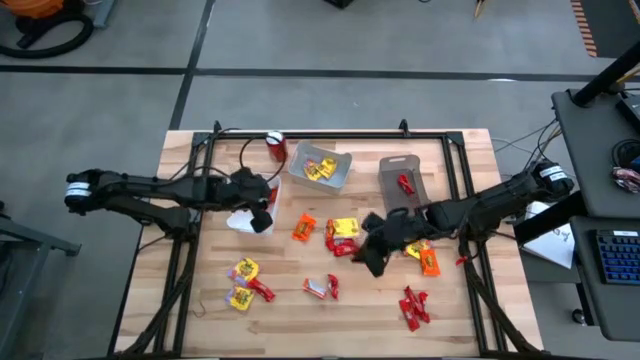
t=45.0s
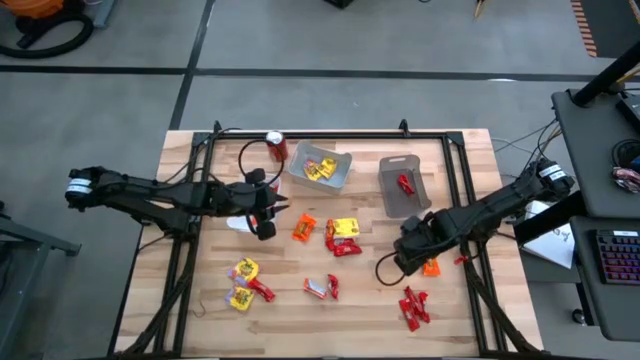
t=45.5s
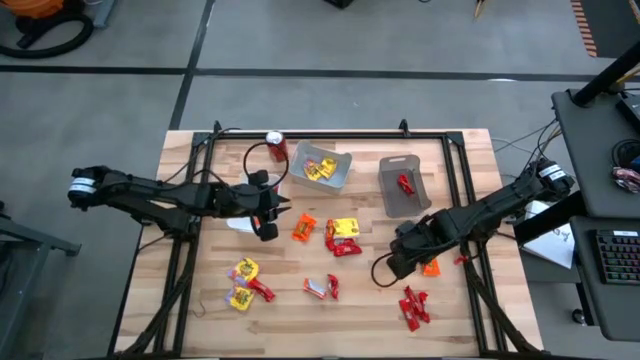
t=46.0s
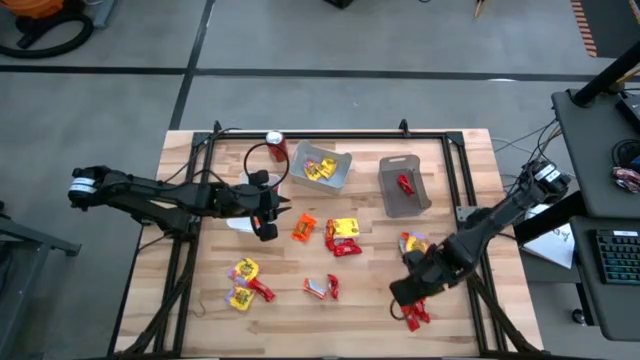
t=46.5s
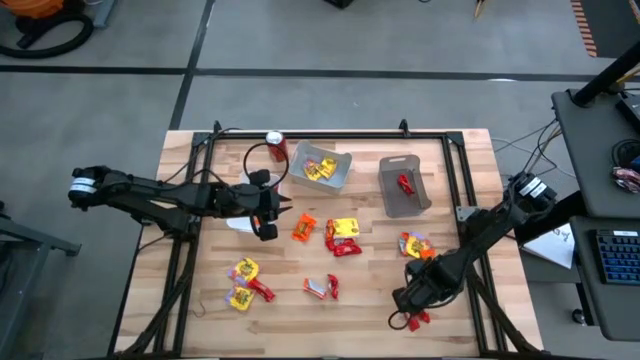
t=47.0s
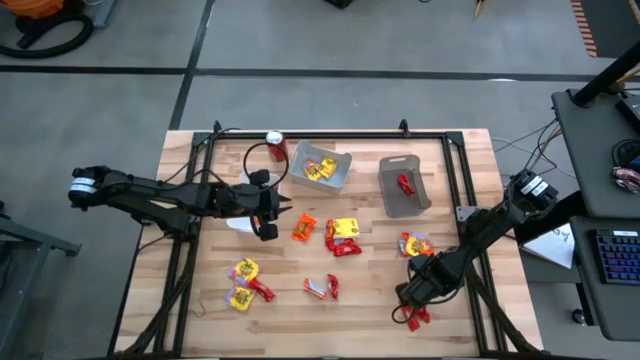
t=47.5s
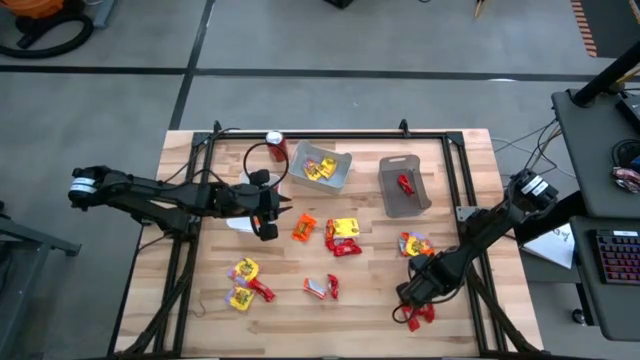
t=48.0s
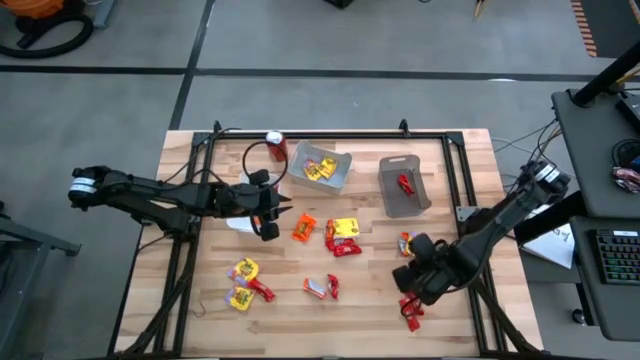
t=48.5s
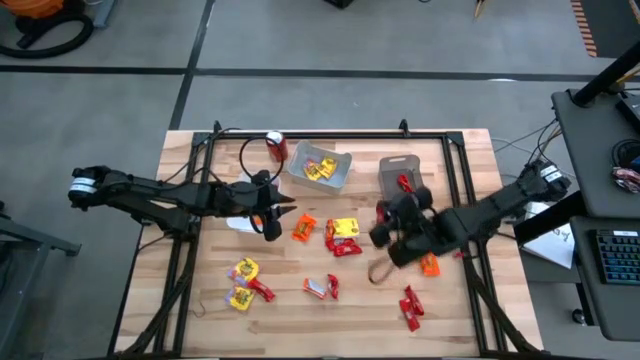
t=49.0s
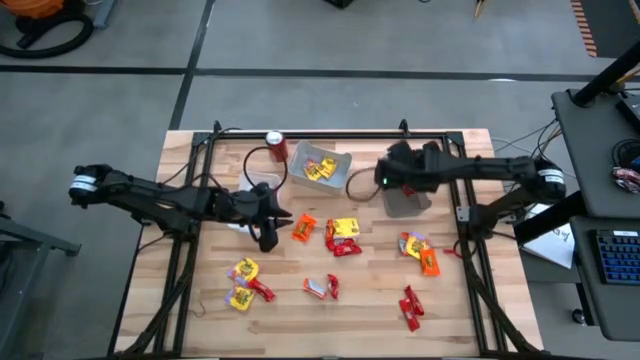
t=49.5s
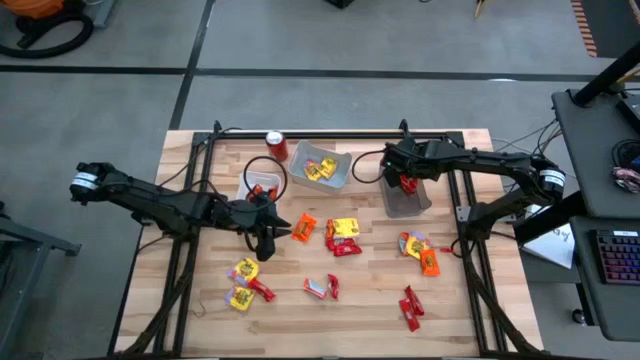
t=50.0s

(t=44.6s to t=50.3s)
Task: Sort candy
Put the red chocolate into the black bin

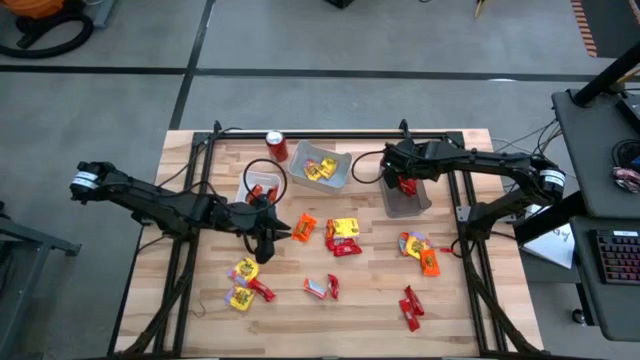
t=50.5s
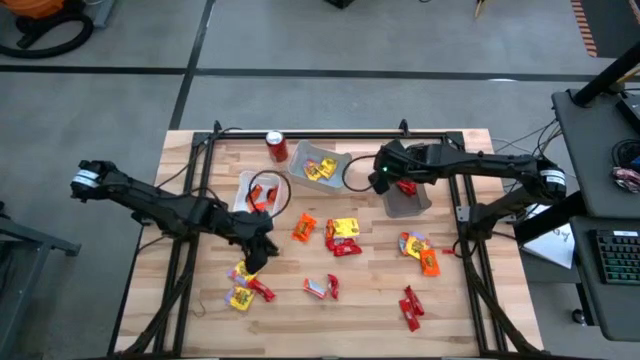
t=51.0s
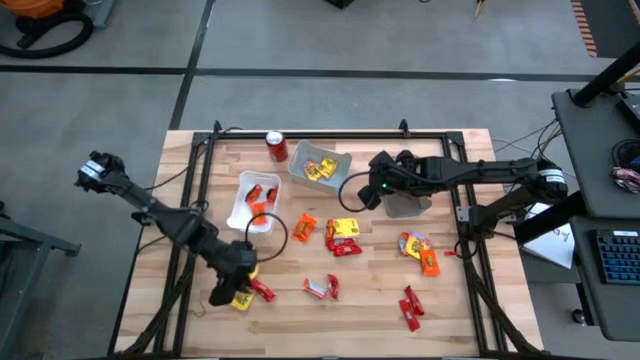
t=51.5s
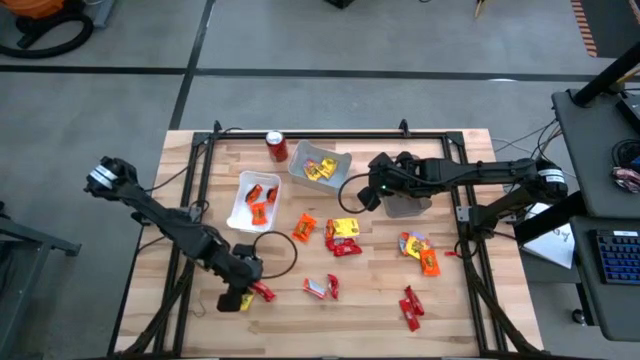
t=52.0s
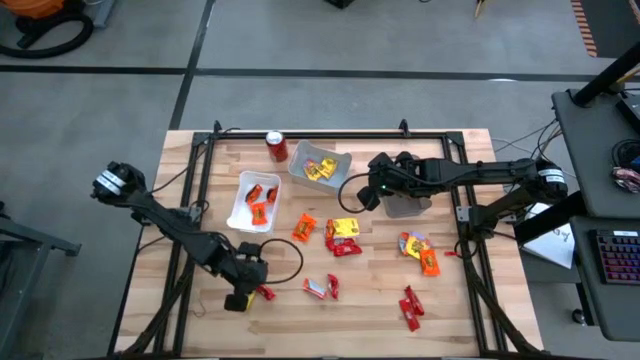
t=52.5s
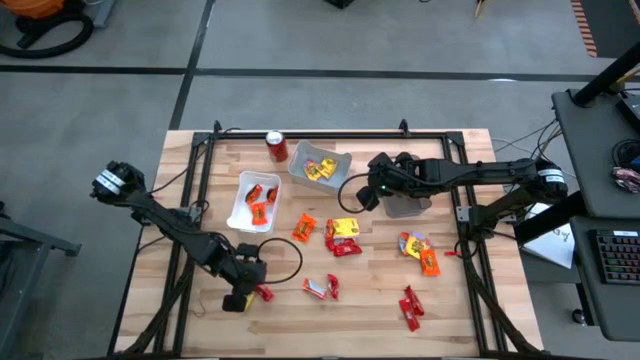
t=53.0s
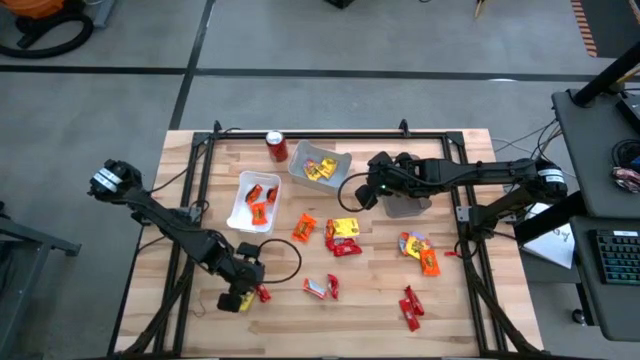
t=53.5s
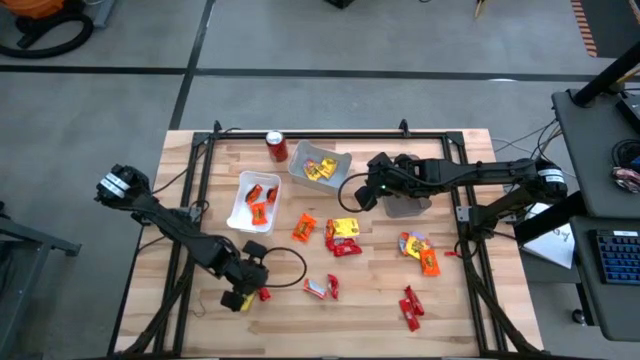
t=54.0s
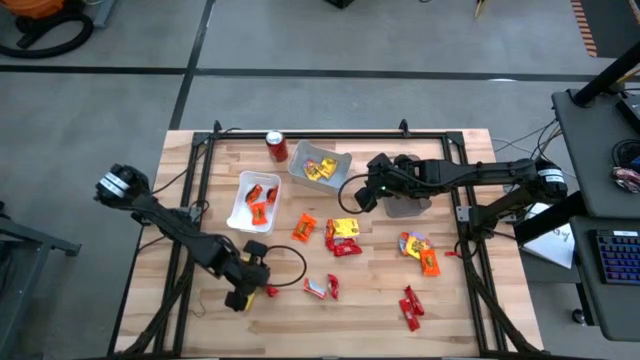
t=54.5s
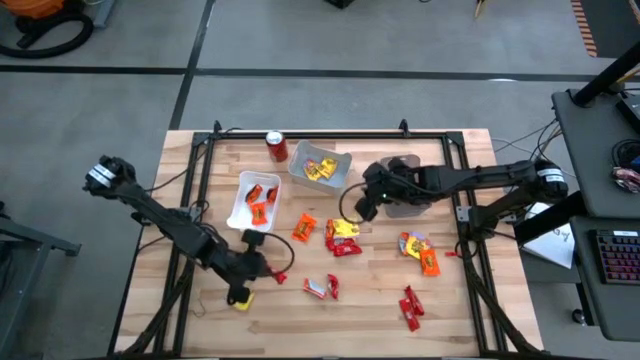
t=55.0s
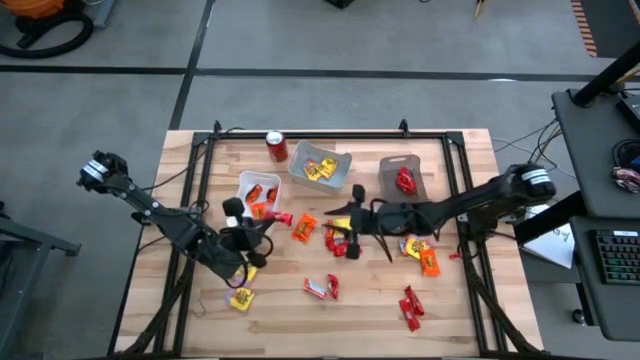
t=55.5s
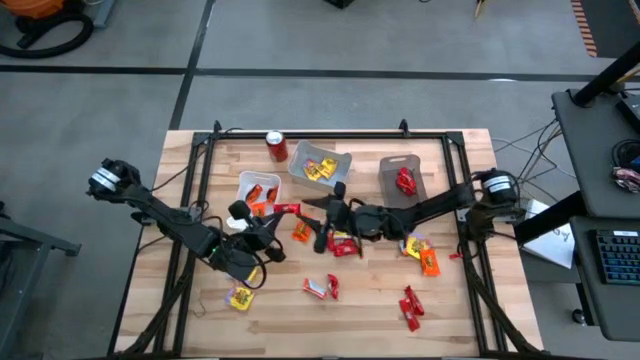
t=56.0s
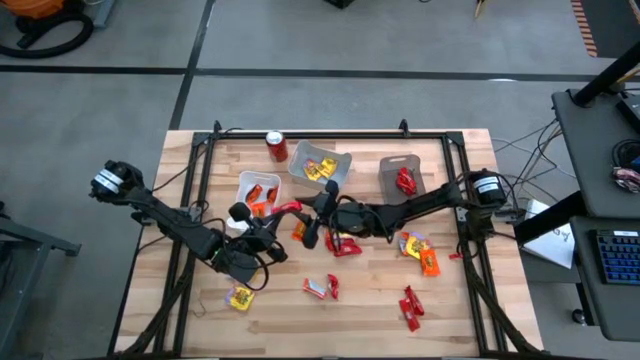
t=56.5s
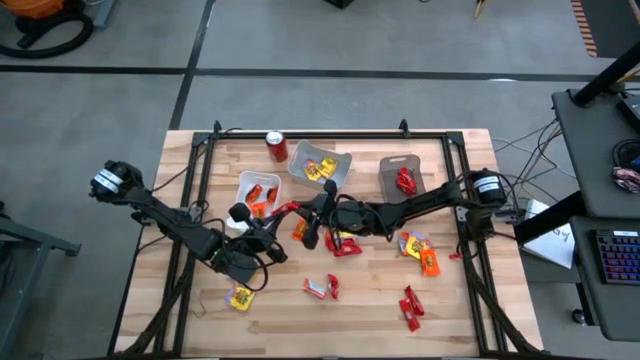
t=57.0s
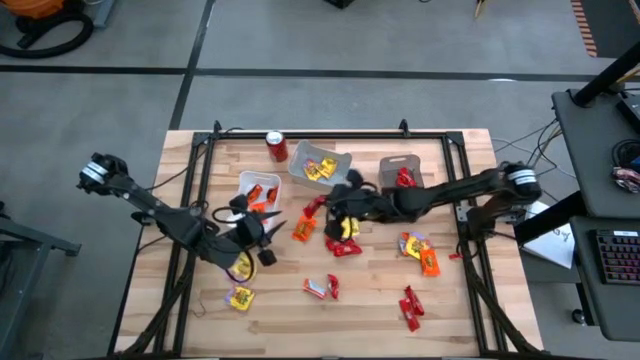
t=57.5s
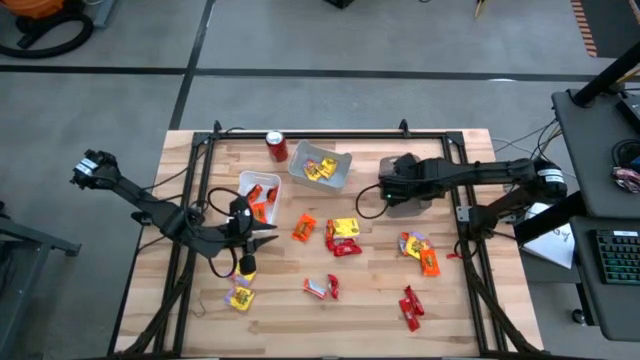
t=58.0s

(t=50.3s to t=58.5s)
Put the red chocolate into the black bin

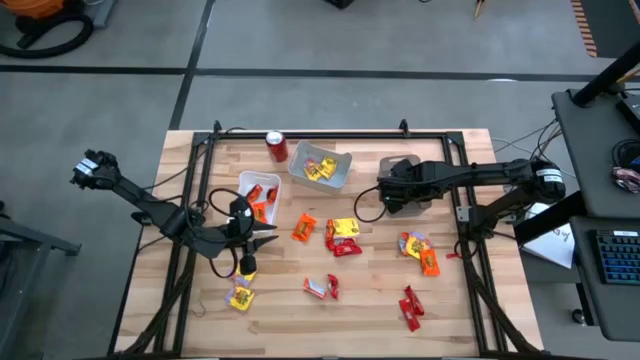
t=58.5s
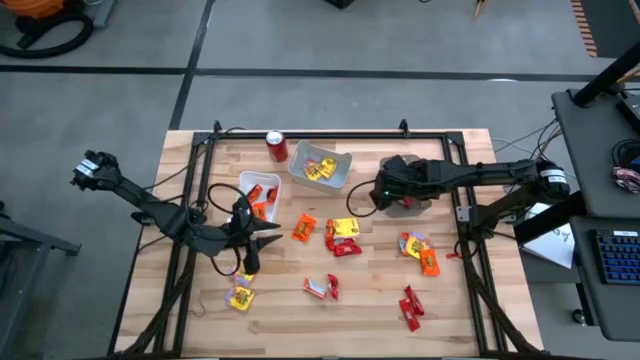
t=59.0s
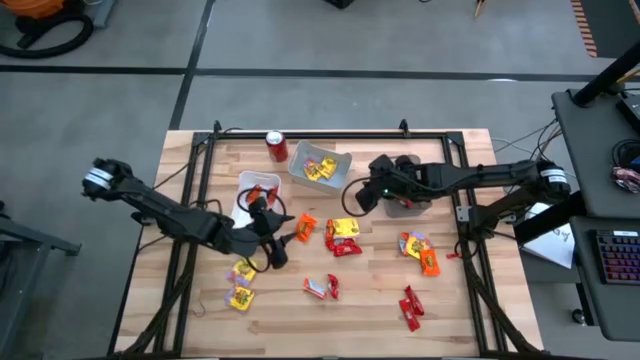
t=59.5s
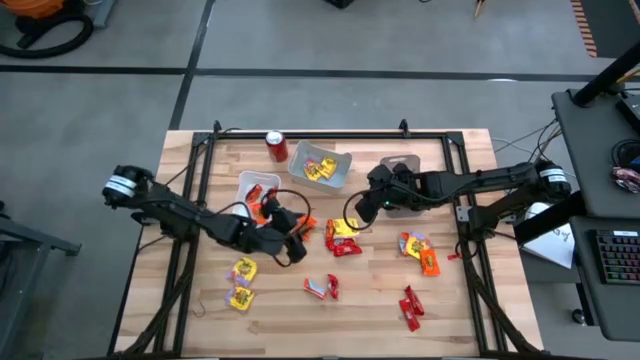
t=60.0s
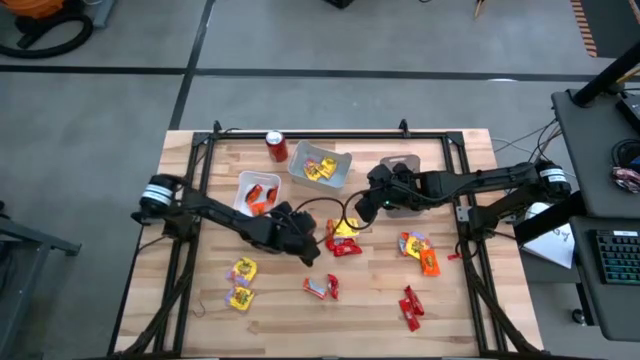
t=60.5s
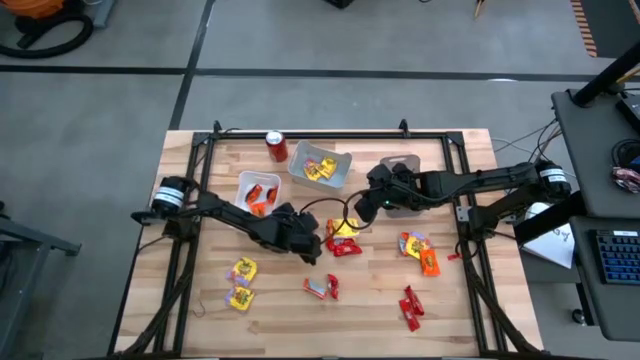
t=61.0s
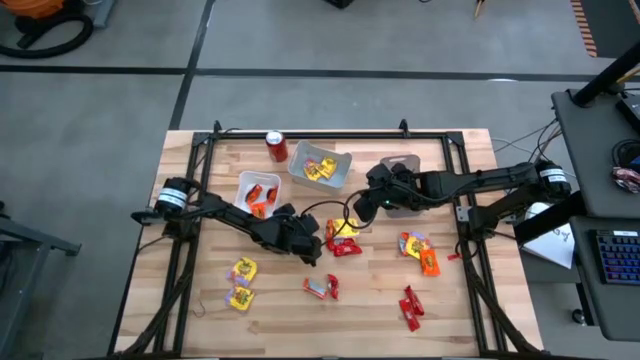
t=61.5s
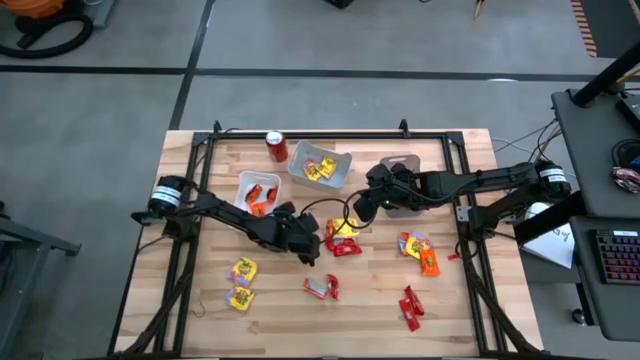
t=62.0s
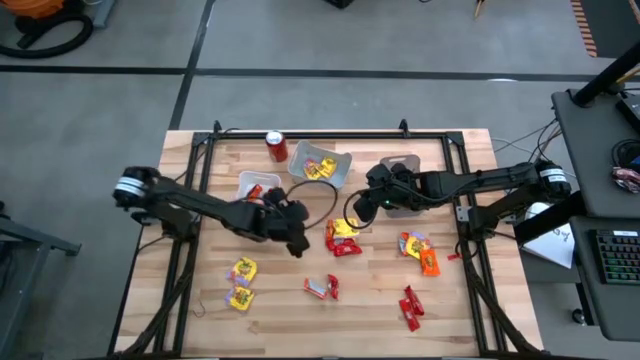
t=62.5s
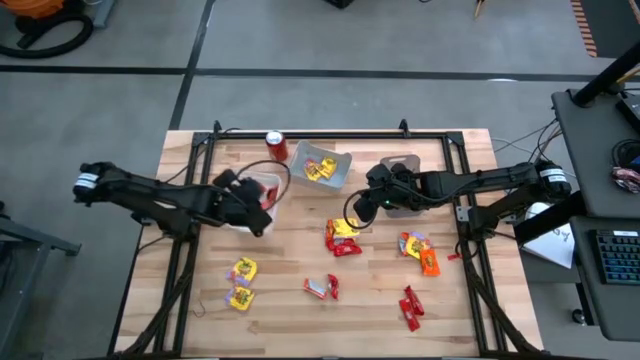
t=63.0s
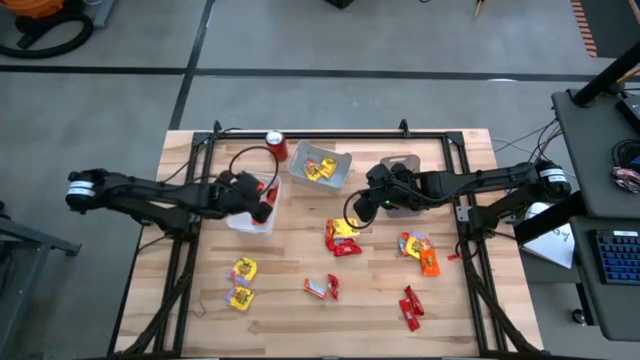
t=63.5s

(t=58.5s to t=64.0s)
Put the orange chocolate into the white bin

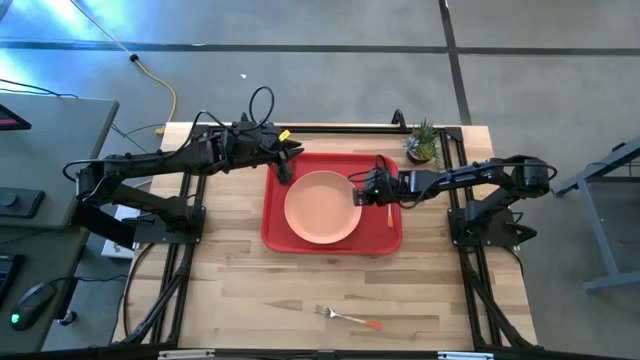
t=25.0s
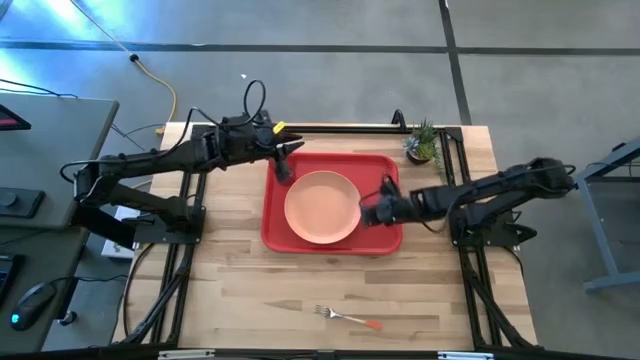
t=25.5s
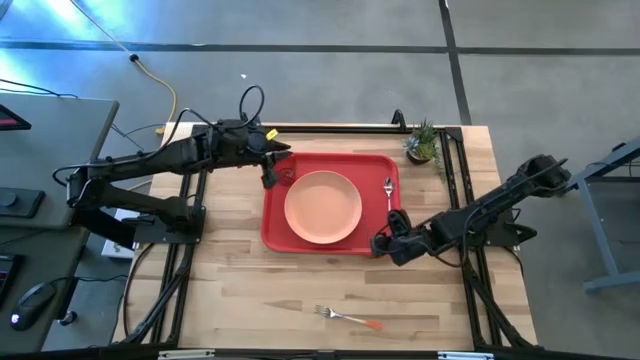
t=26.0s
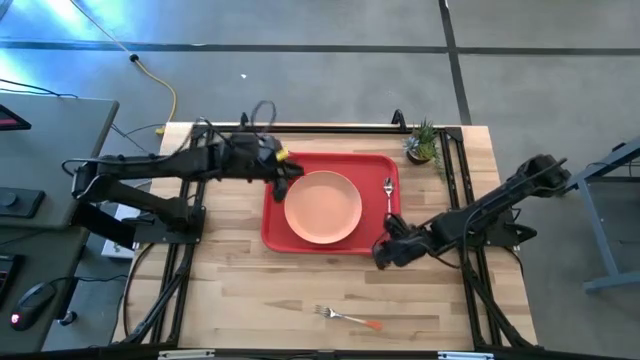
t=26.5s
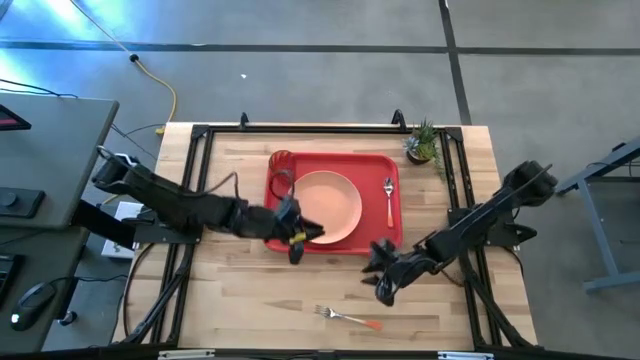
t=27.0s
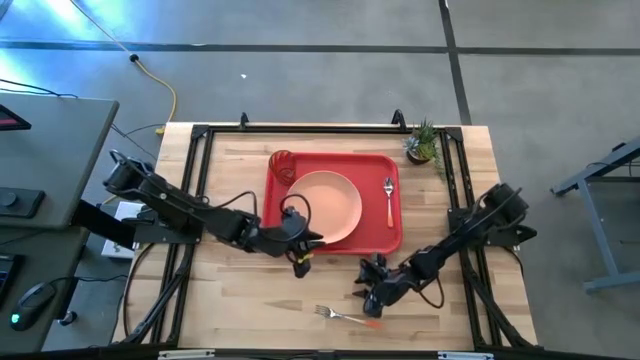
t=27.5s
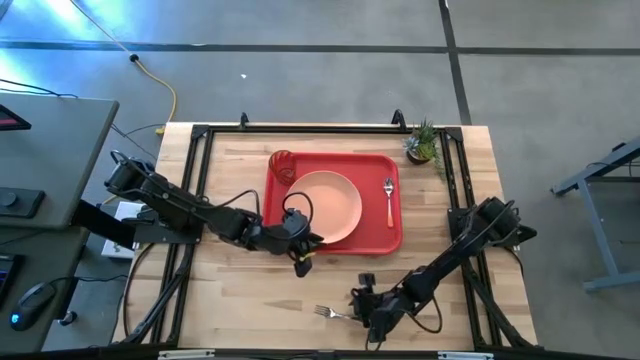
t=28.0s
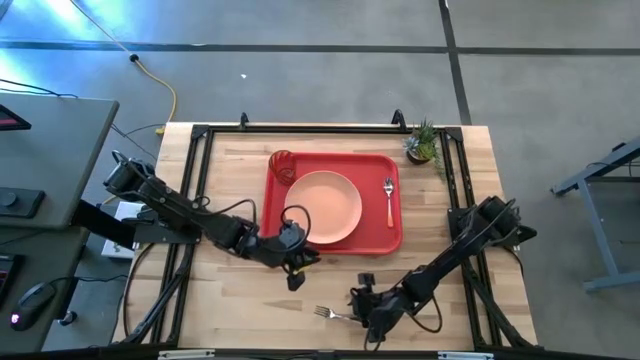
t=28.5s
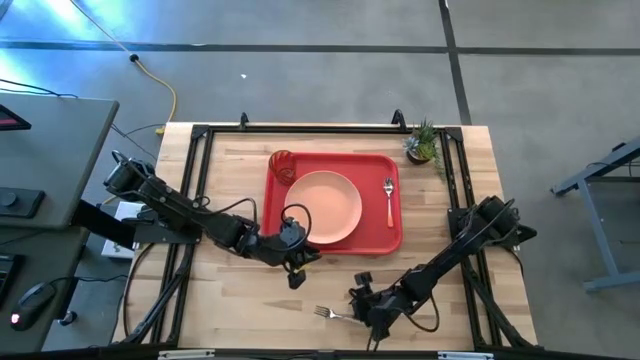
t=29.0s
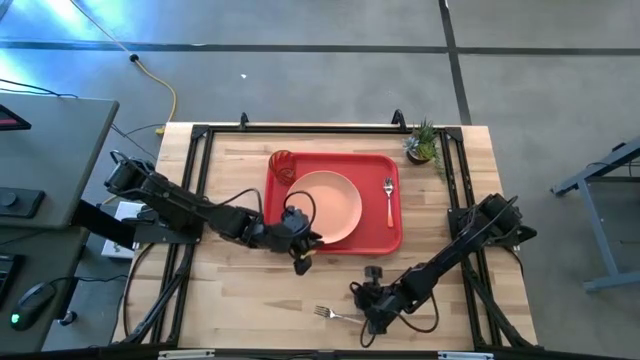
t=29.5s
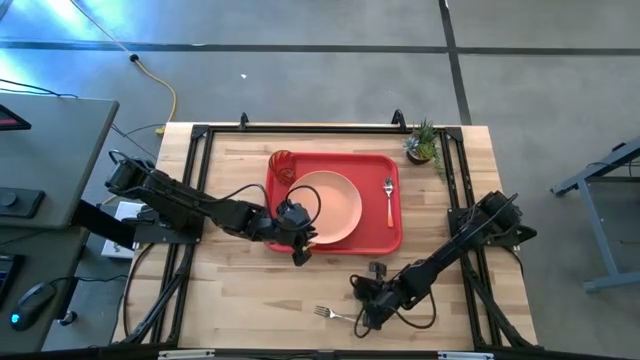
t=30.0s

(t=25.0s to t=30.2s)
Task: Pick and place plate/cup/fork/spoon on tray
Put the orange fork on the red tray to the right of the orange plate
